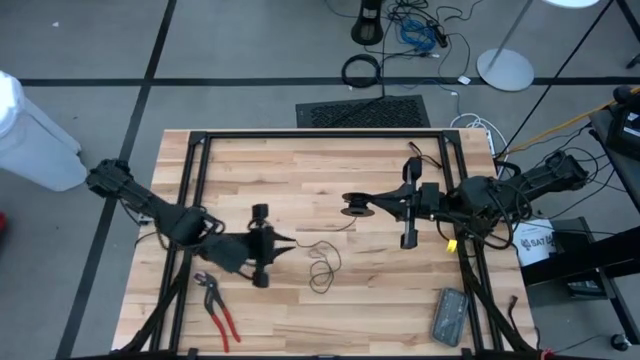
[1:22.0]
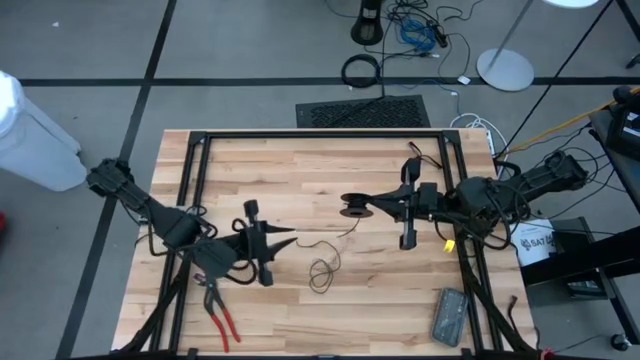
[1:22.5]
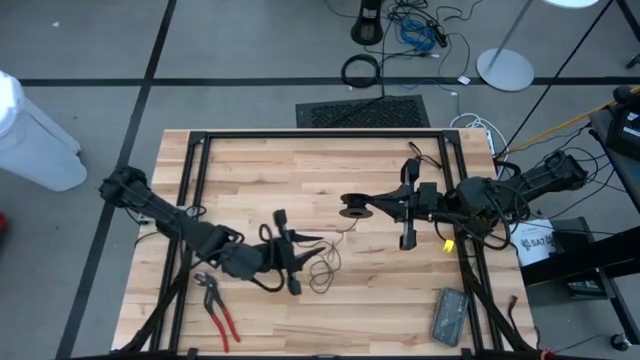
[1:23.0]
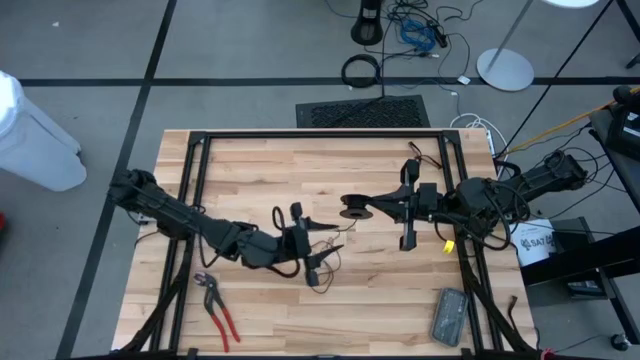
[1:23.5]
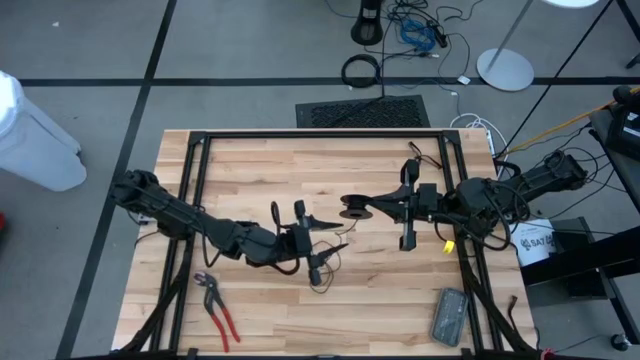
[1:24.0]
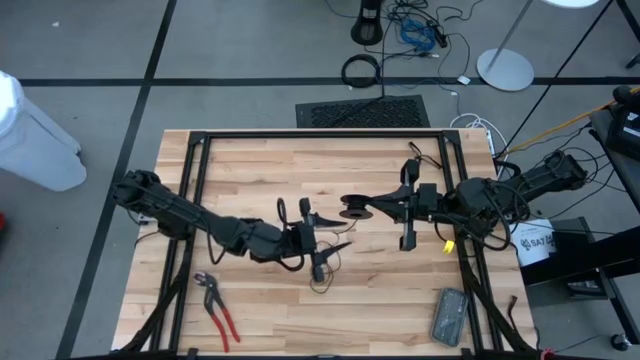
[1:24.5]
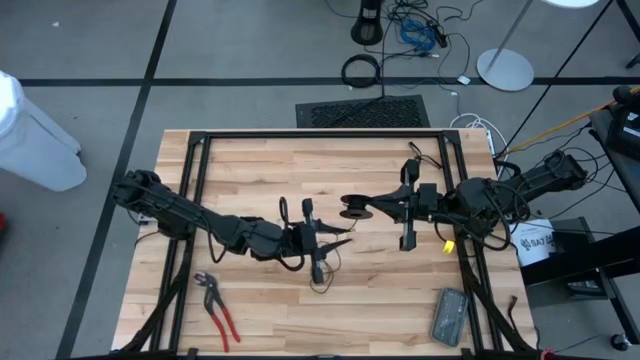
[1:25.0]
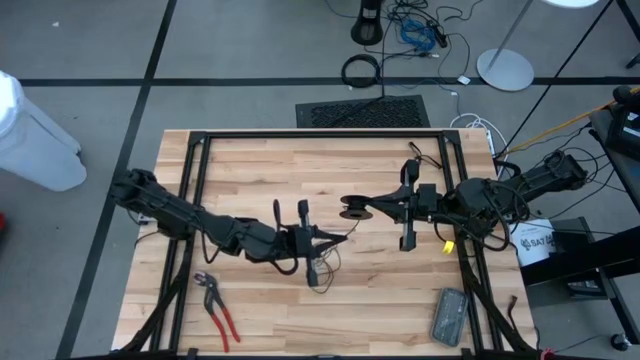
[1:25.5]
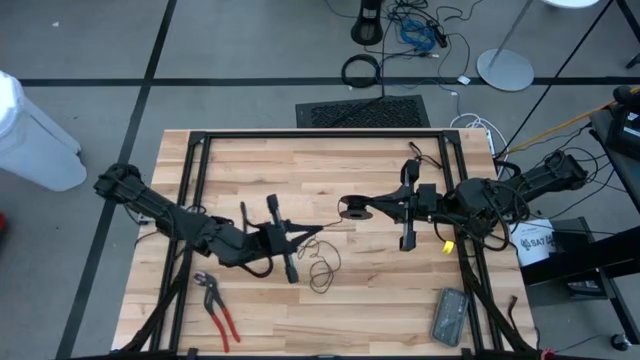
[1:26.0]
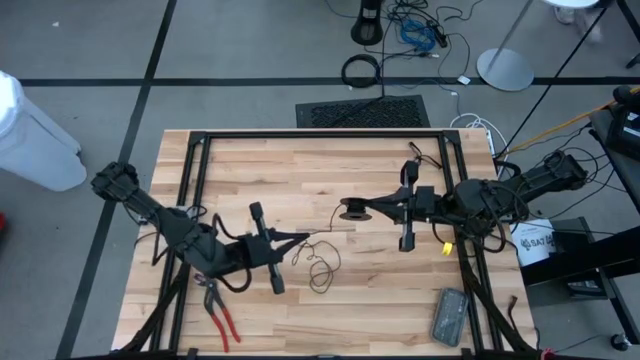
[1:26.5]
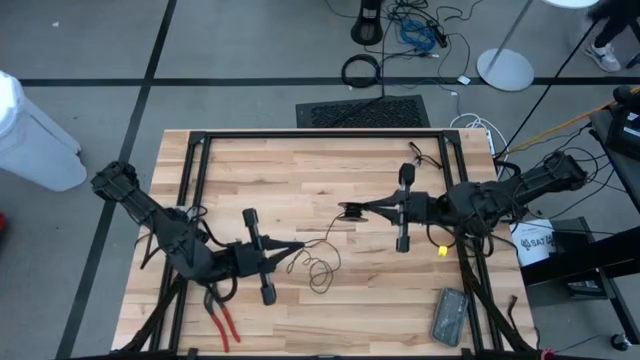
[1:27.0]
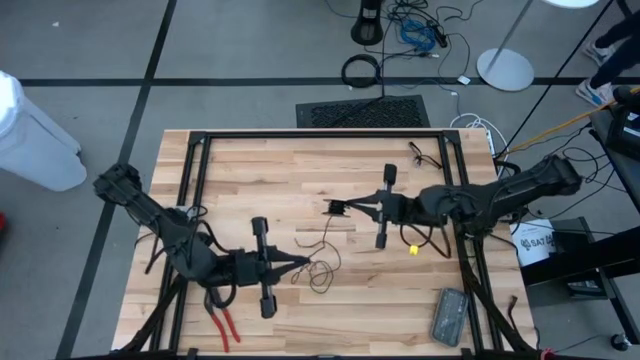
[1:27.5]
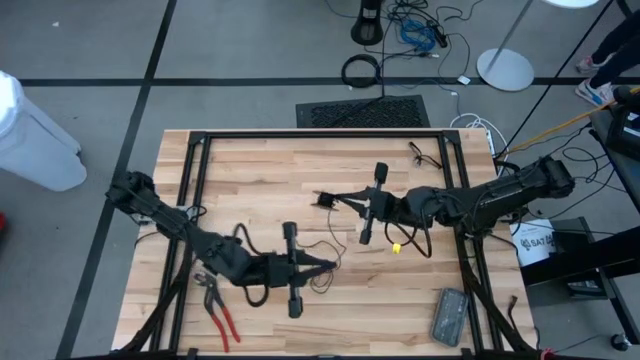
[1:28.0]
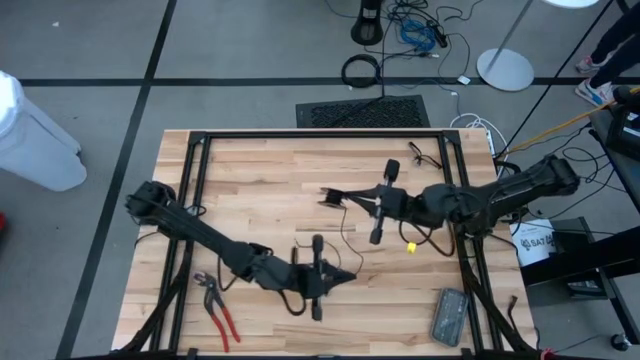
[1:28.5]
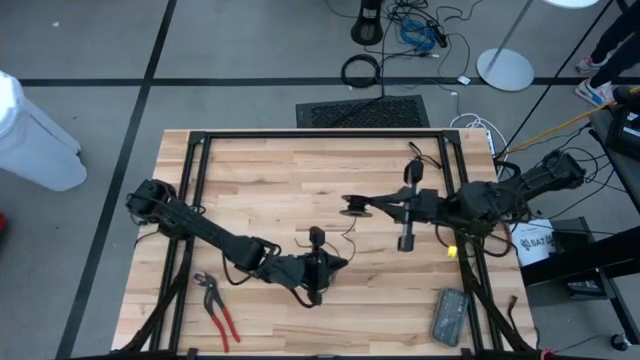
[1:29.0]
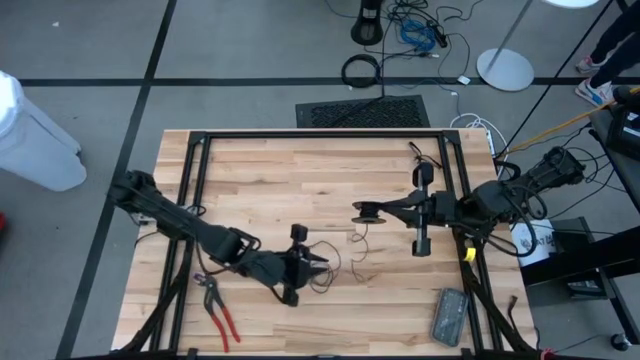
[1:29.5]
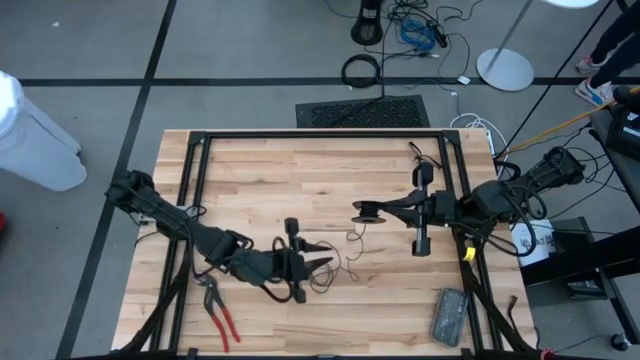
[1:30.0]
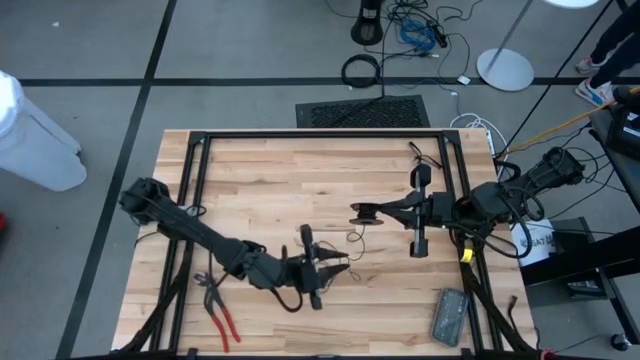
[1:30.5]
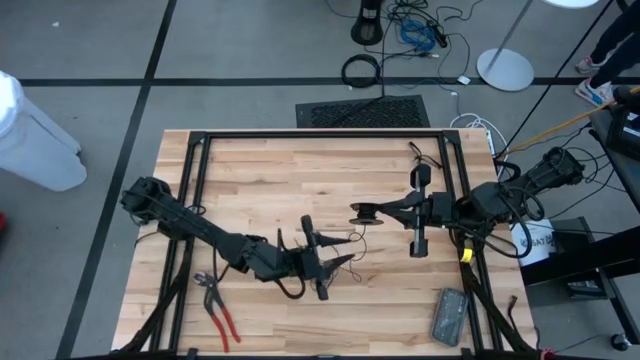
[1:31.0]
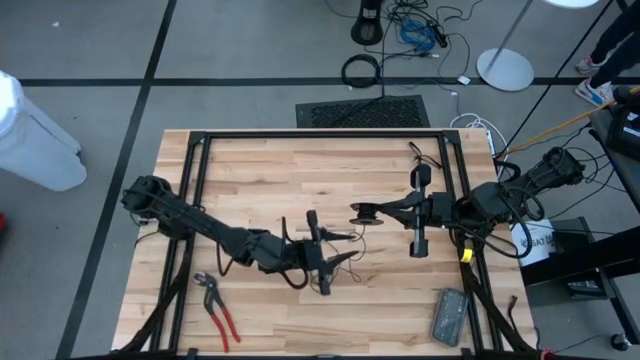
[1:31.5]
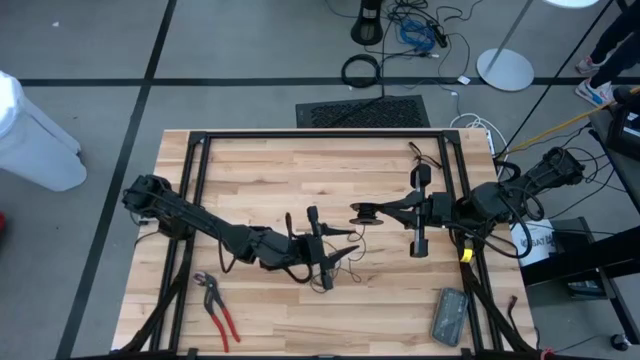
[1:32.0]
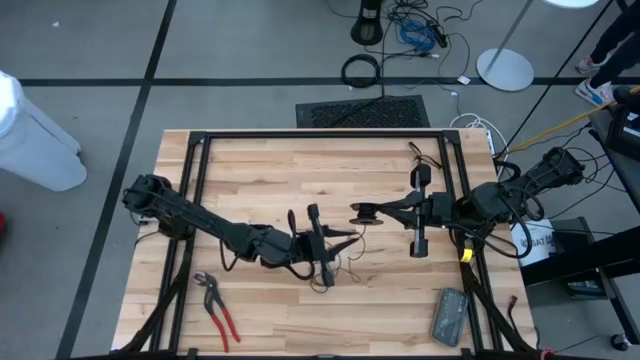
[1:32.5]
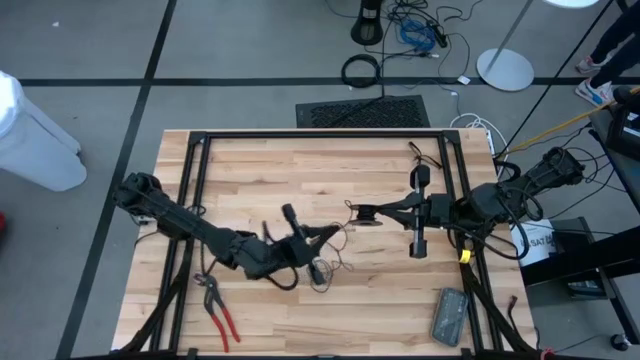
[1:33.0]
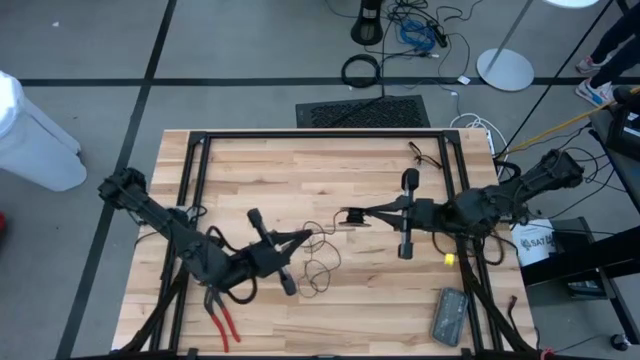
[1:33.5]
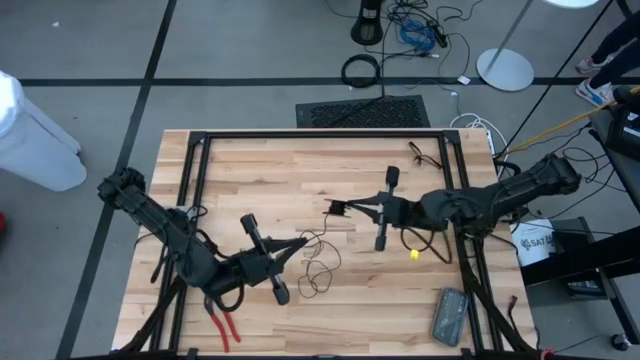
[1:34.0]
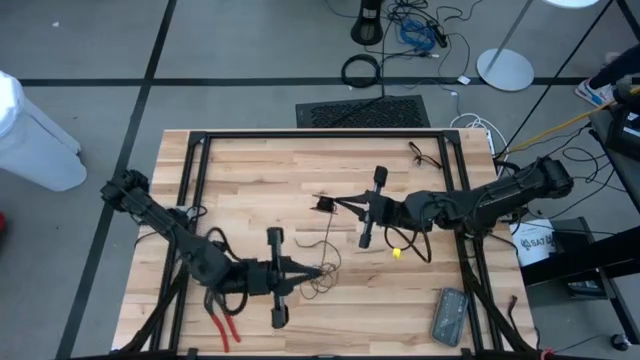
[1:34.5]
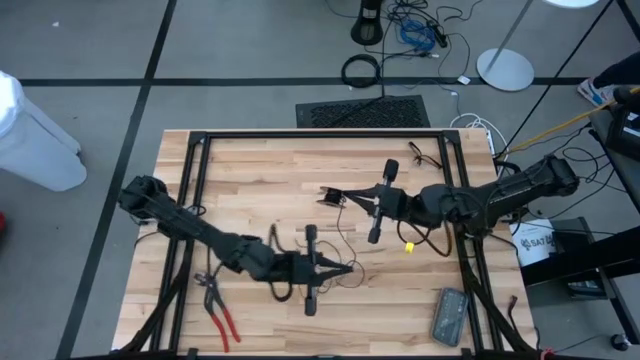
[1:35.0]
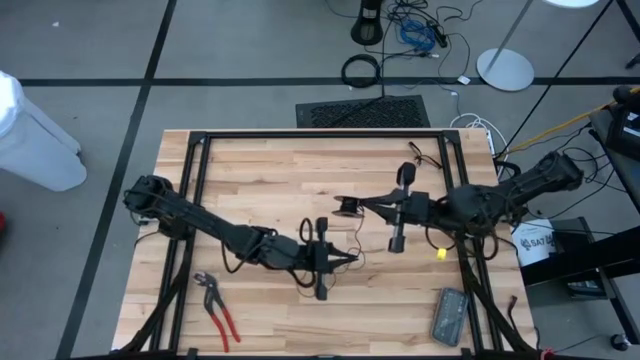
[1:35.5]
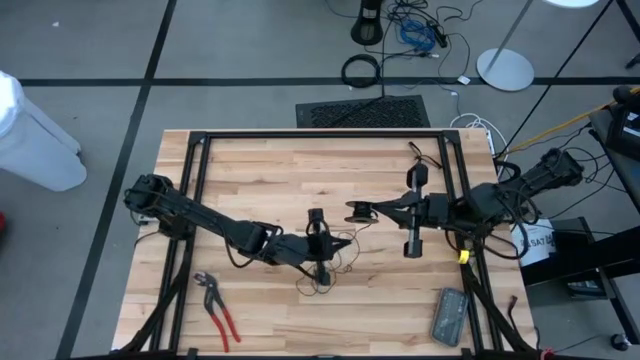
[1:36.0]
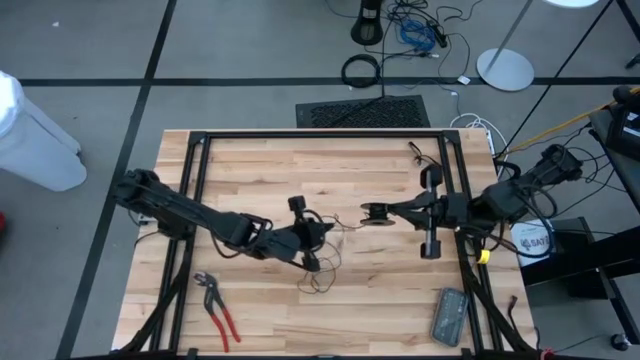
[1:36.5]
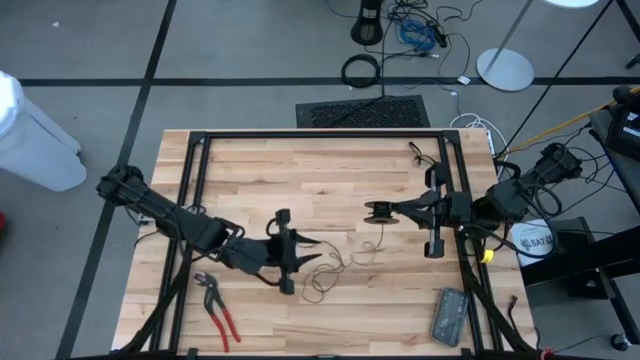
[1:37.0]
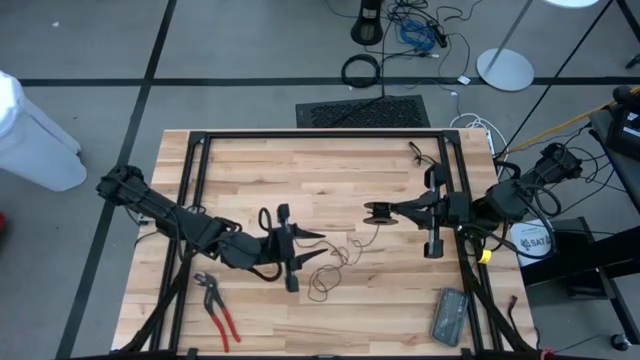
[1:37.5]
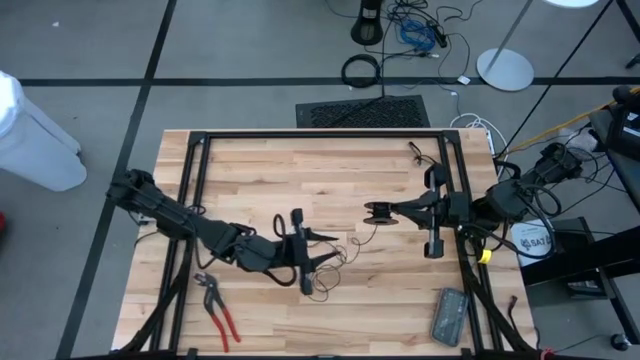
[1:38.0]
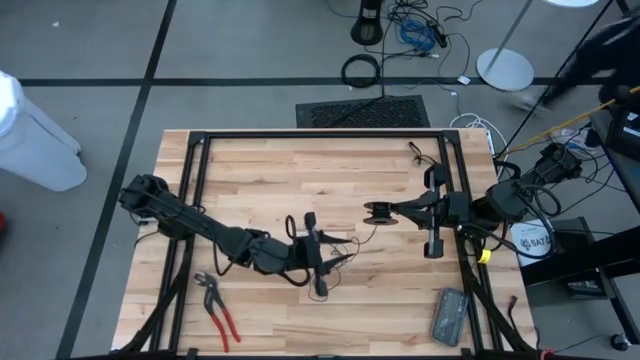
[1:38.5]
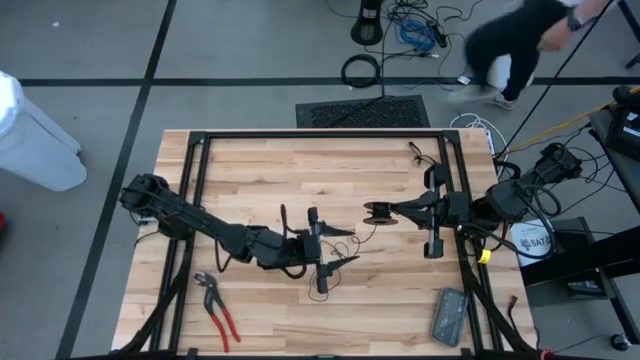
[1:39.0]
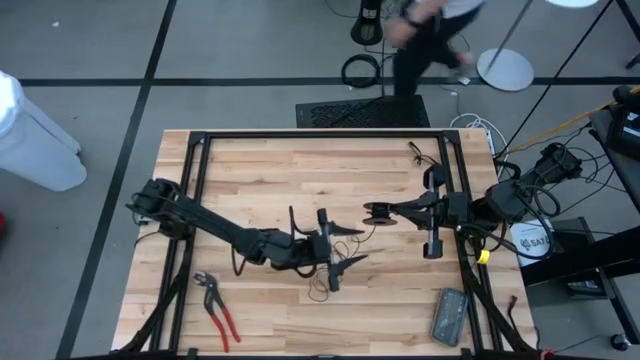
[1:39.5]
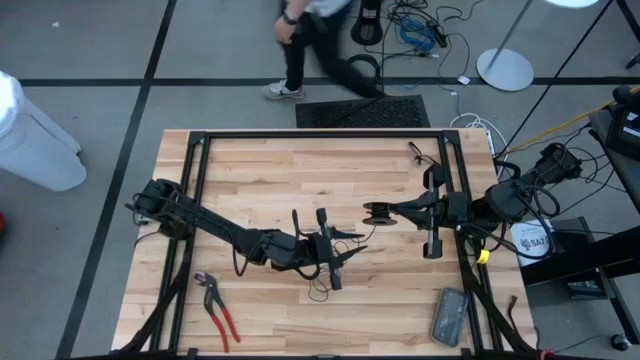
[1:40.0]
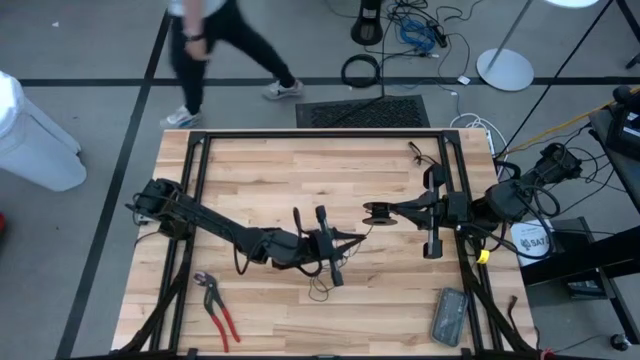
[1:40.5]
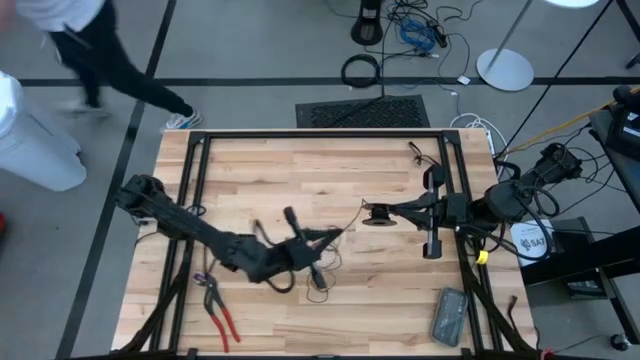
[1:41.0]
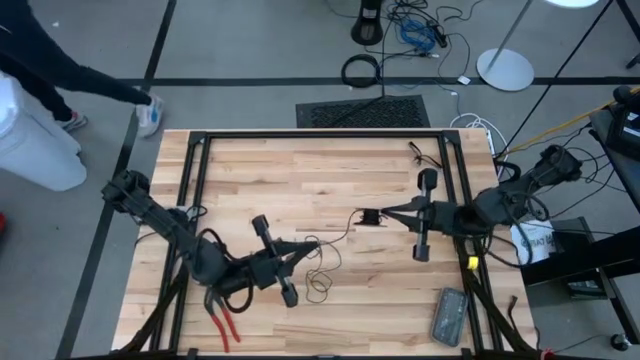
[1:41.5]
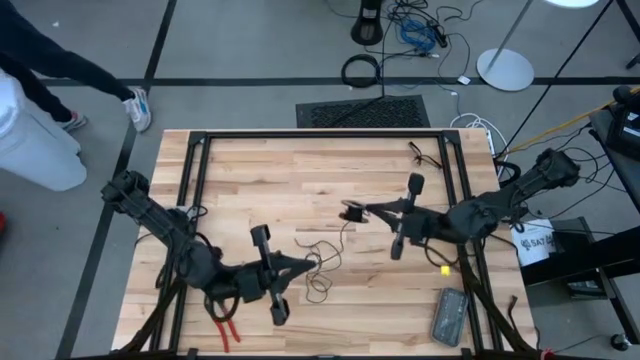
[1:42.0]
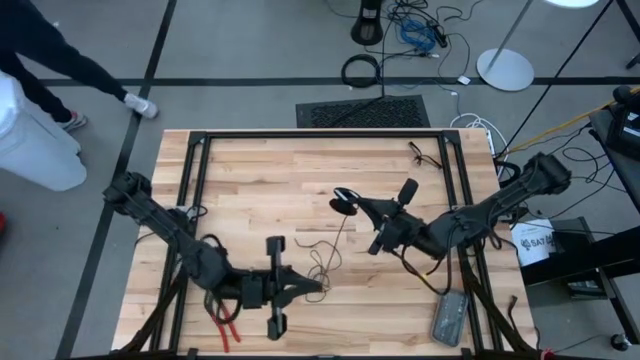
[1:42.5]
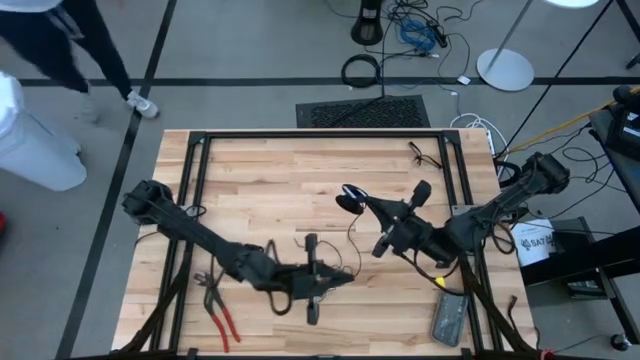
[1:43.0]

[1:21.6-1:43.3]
Task: Coil cords
Uncoil the black wire from the black spool
